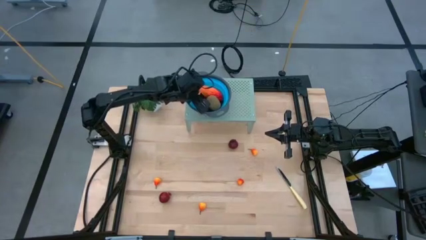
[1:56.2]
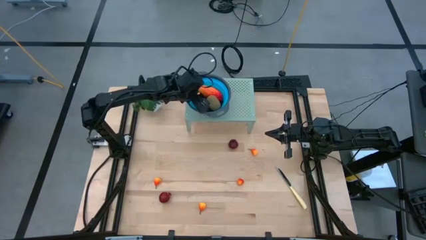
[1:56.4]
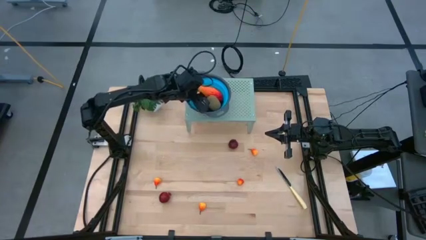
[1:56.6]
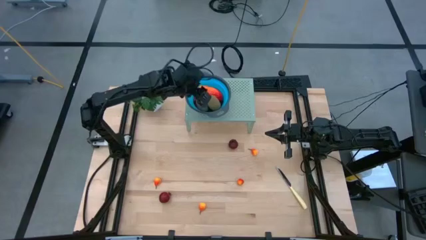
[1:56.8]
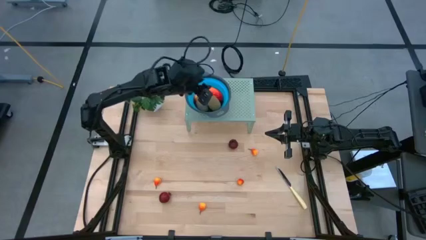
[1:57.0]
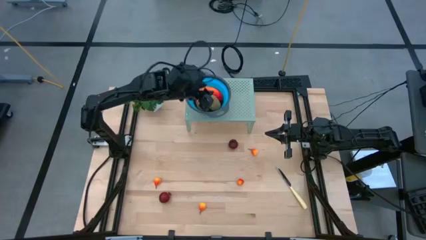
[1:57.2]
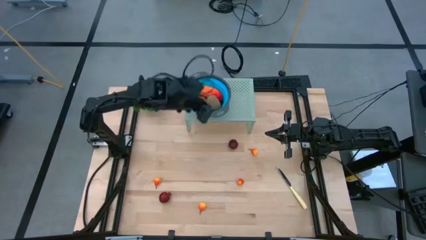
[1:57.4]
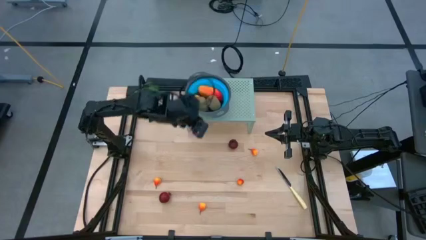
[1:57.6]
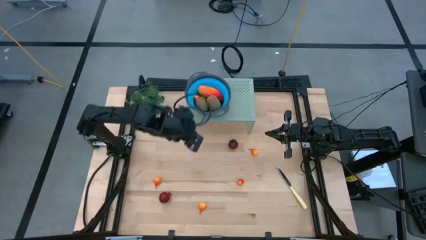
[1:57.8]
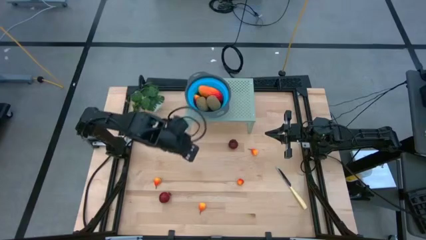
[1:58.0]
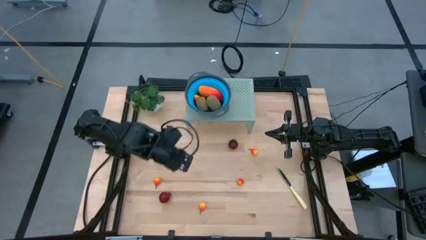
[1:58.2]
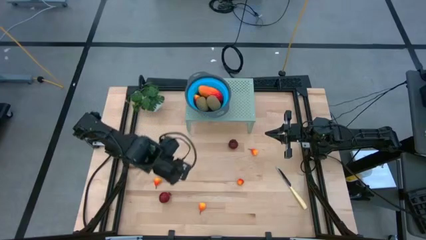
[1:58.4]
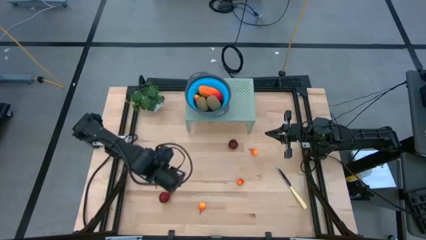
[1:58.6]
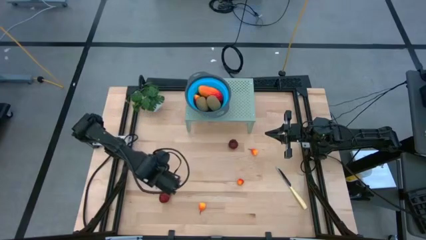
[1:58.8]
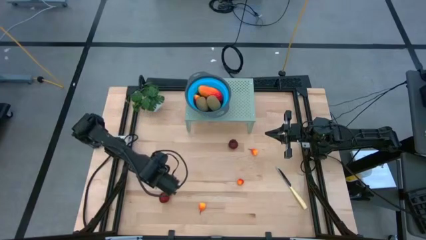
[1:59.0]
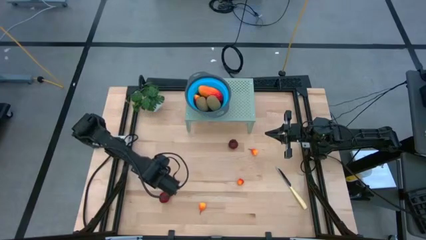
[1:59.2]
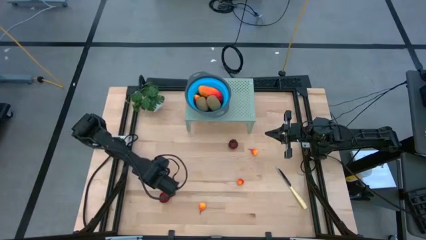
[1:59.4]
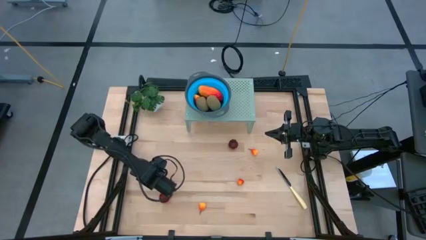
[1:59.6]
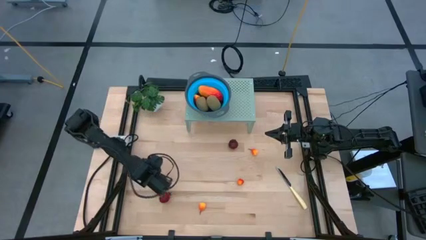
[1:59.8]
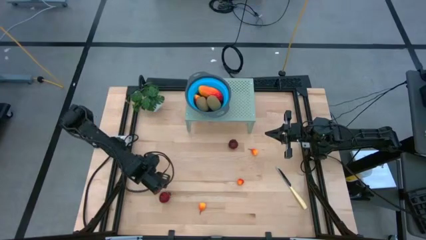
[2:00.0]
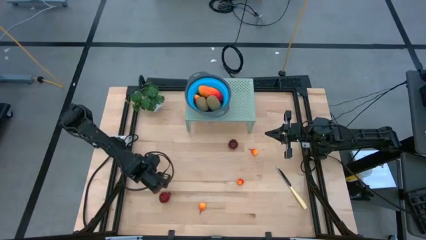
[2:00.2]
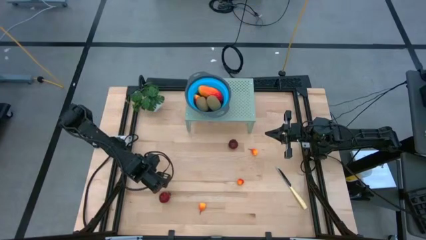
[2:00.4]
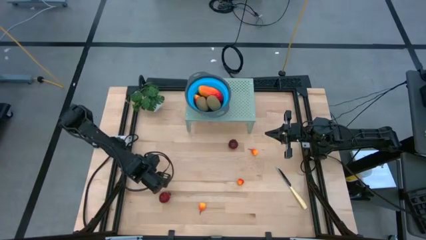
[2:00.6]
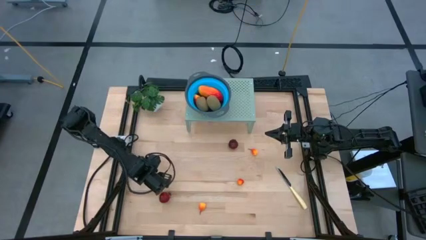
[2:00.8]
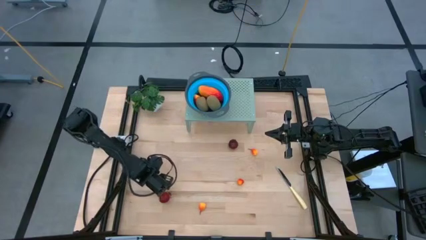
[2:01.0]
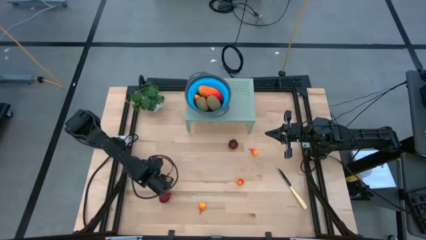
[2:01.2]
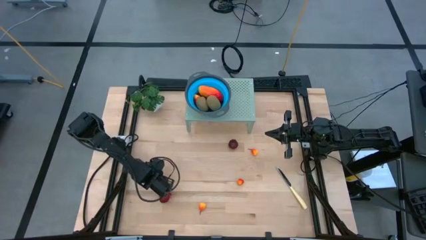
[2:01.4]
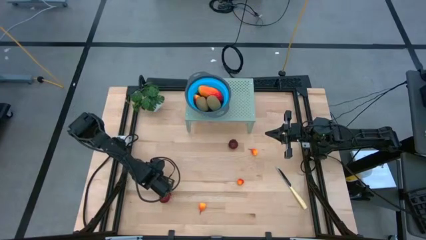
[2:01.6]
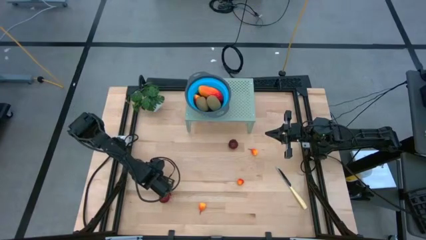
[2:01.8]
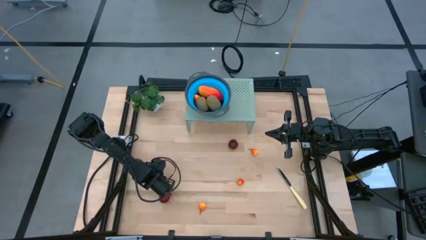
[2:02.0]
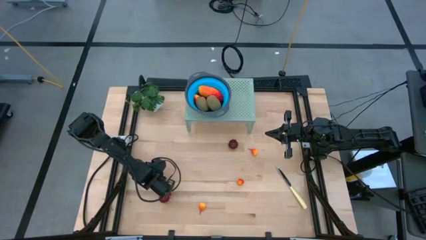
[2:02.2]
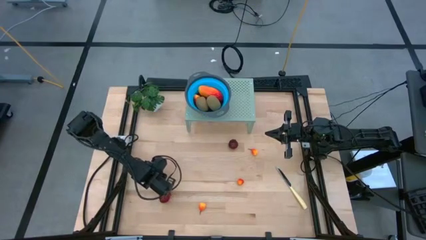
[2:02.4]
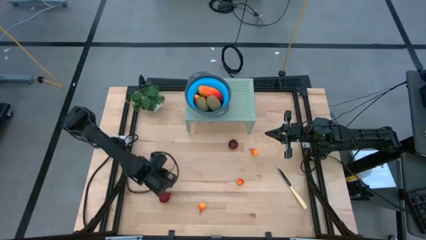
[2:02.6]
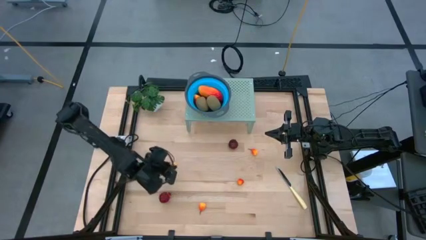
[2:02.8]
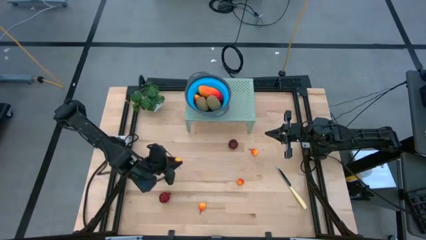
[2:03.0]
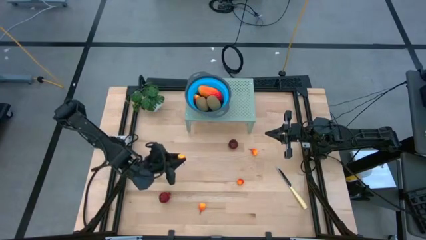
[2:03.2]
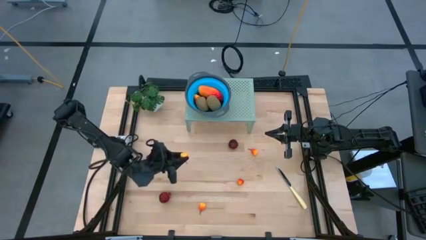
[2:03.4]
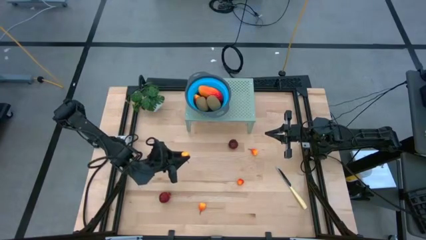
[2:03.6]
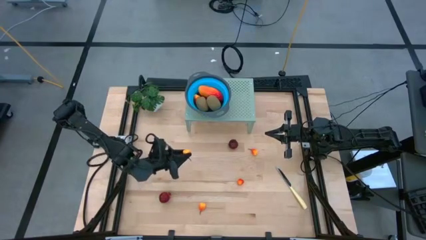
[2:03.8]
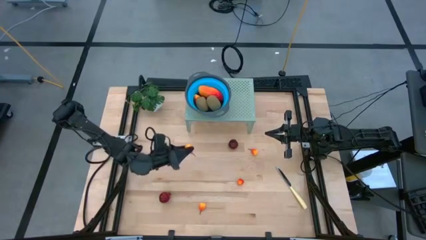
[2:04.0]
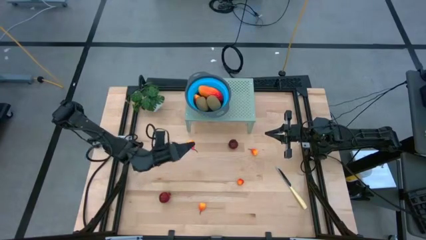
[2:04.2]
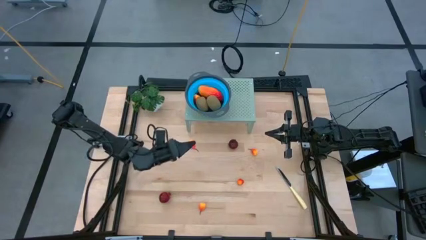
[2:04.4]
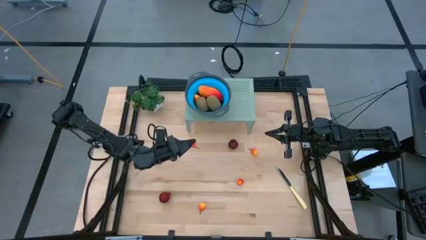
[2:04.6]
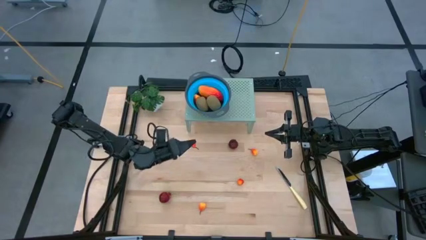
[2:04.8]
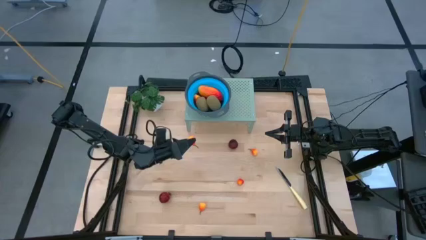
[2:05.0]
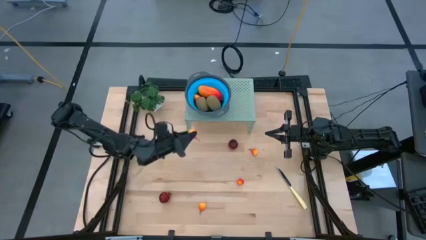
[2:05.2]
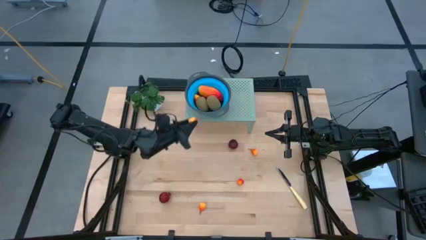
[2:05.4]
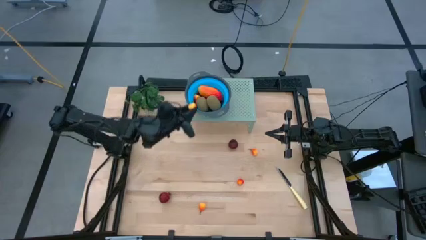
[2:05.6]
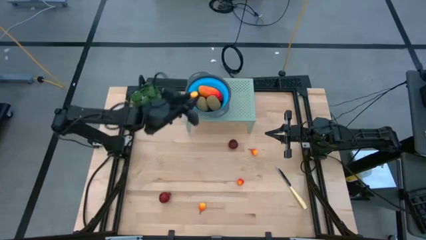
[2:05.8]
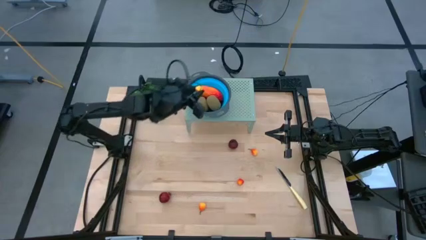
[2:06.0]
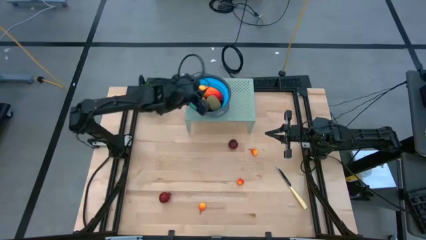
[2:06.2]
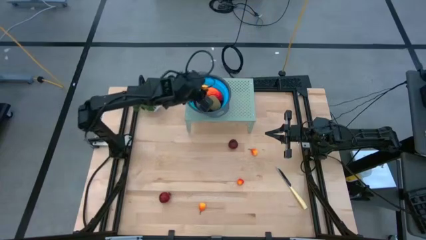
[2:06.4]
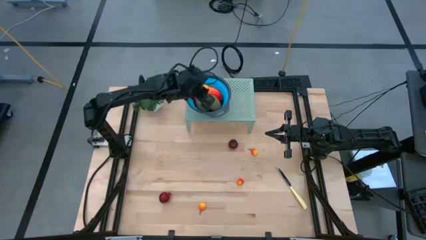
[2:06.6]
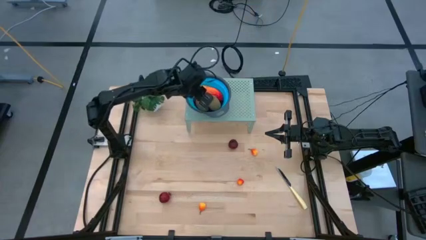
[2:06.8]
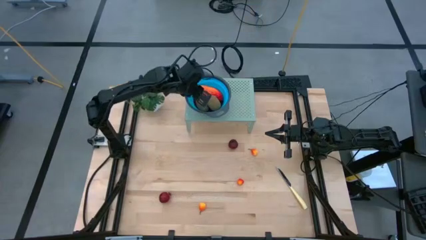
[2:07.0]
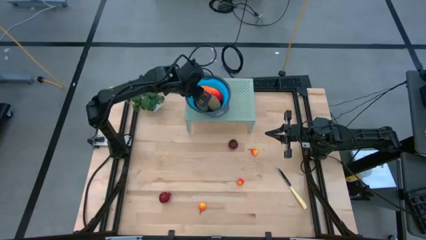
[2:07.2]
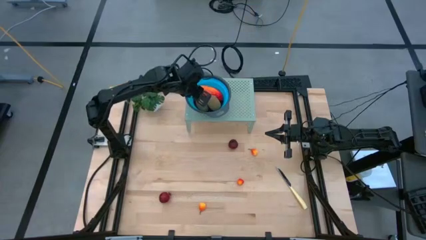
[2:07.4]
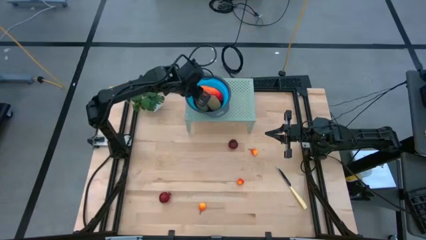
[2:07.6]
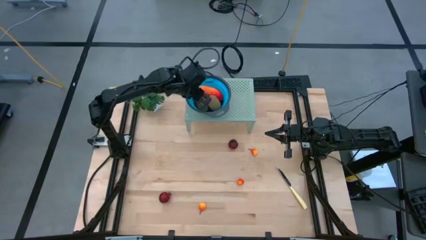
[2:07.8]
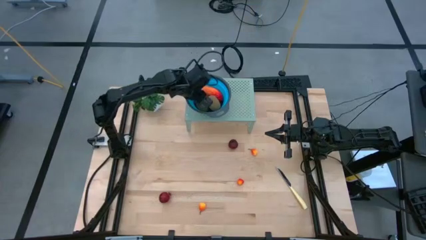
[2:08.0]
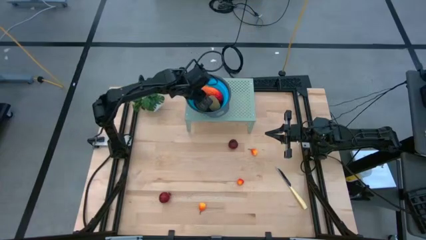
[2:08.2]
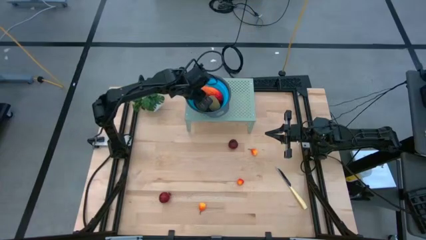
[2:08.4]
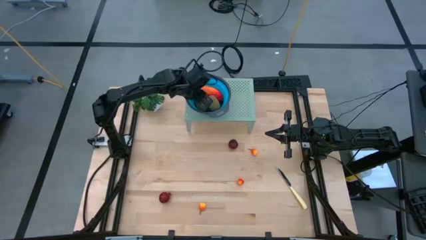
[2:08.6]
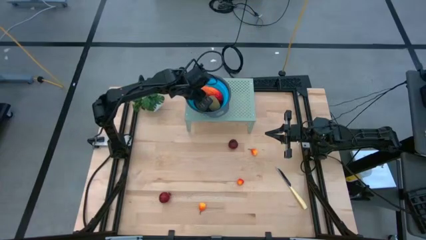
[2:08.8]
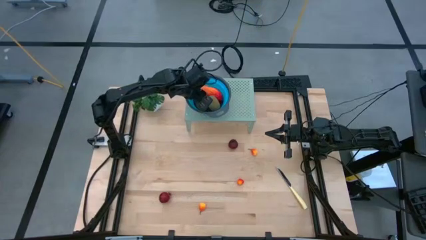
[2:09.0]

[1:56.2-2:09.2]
Task: Pick & Place Fruit
Put the orange pear into the blue bowl on the shelf

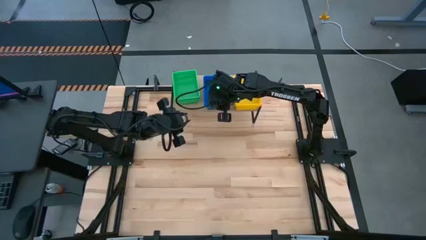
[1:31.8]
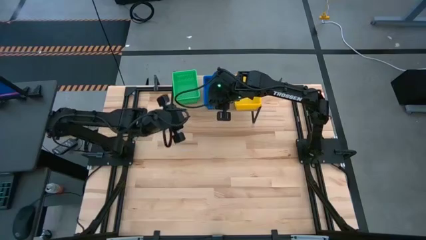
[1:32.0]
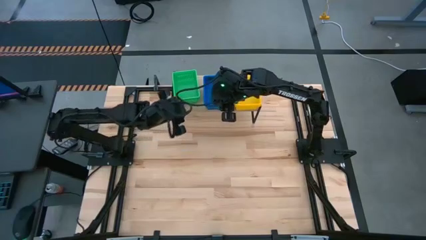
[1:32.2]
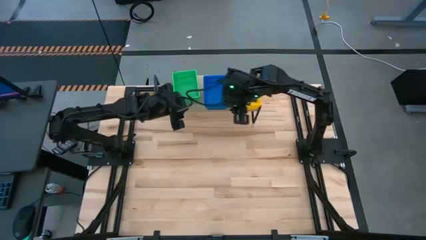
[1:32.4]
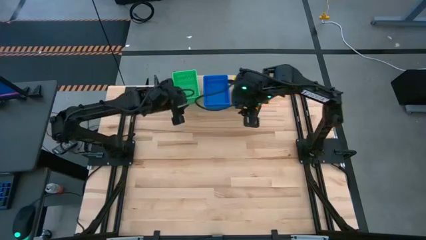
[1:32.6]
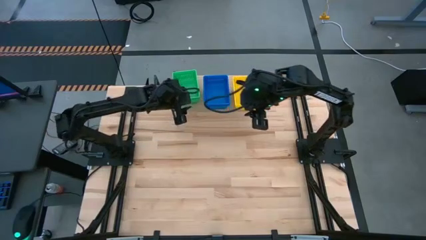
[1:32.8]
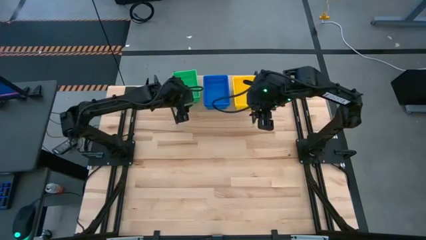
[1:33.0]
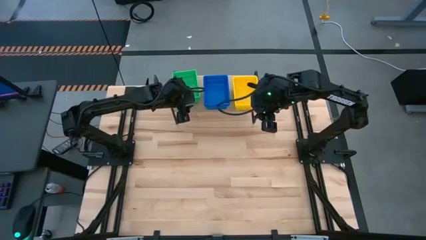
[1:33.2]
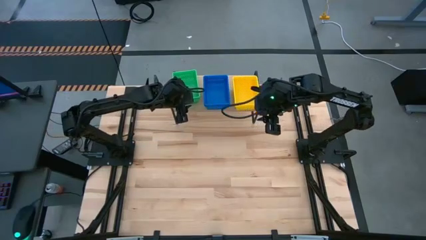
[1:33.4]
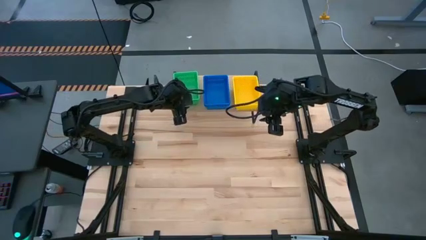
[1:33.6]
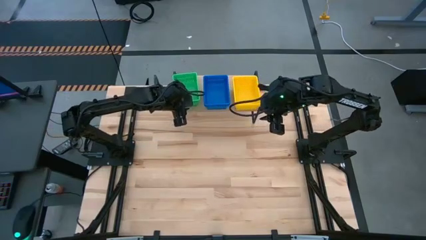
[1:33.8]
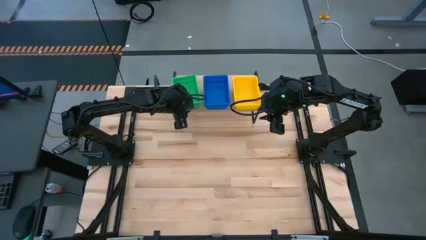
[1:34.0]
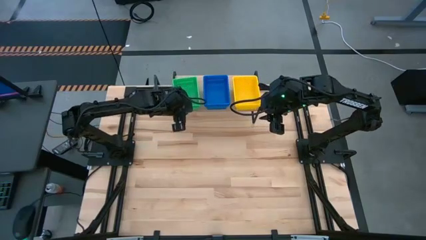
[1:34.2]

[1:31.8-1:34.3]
Task: Stack baskets on shelf by color
Adjust the green bins on the shelf
